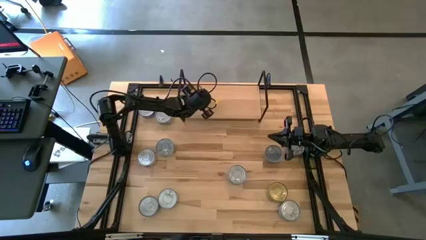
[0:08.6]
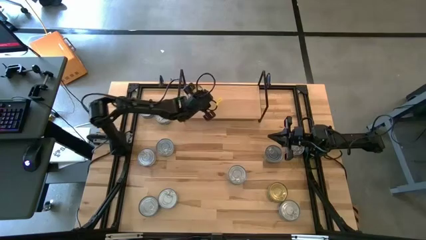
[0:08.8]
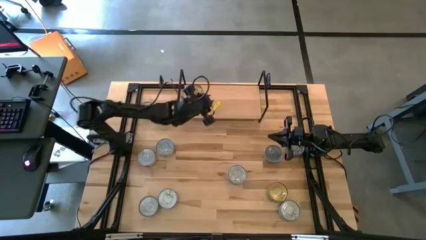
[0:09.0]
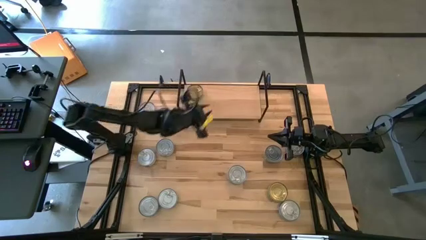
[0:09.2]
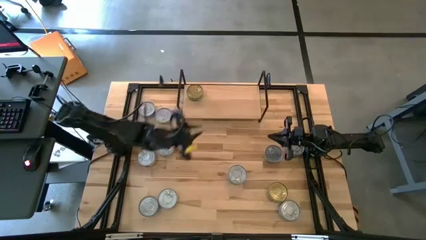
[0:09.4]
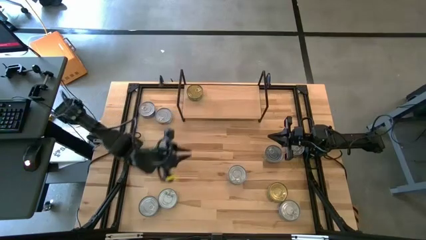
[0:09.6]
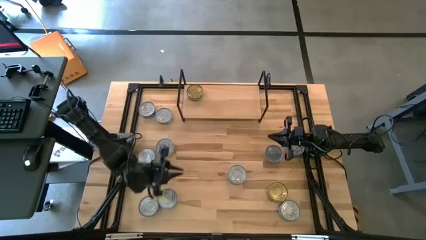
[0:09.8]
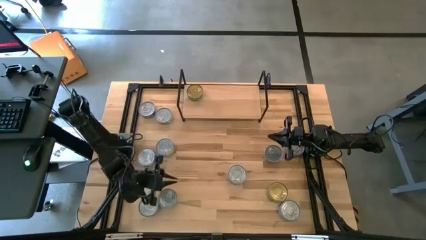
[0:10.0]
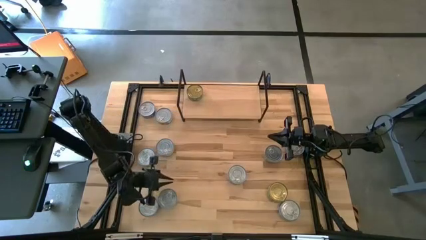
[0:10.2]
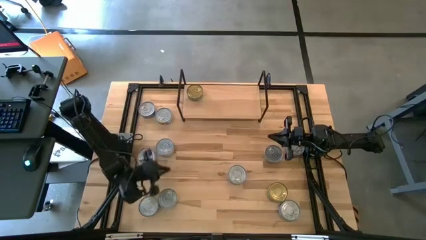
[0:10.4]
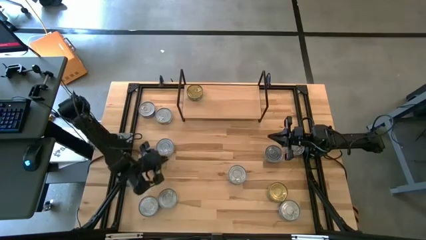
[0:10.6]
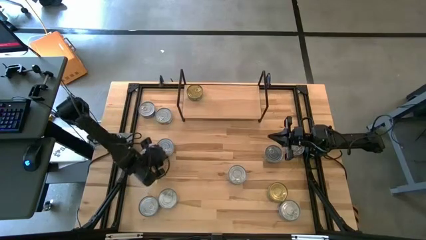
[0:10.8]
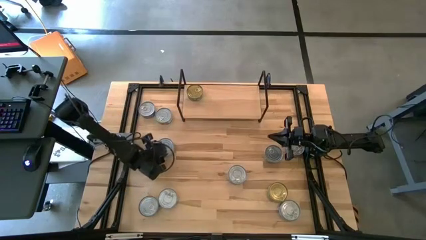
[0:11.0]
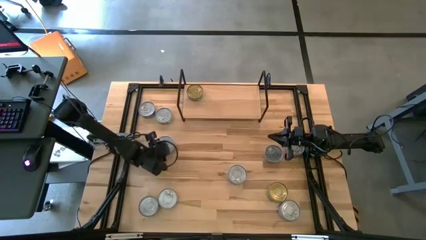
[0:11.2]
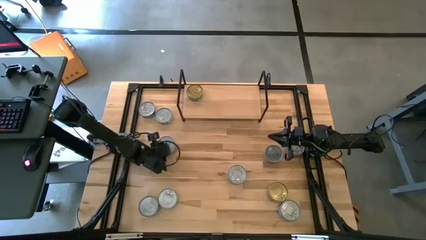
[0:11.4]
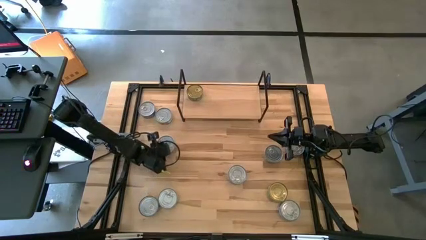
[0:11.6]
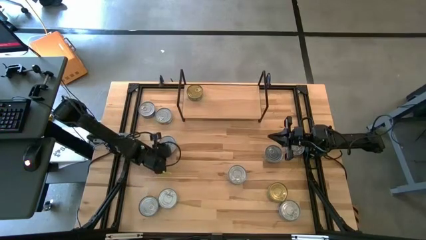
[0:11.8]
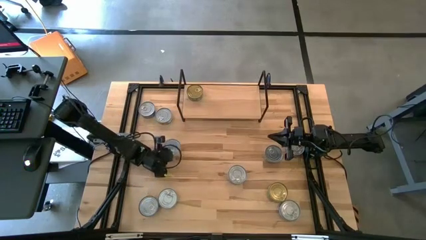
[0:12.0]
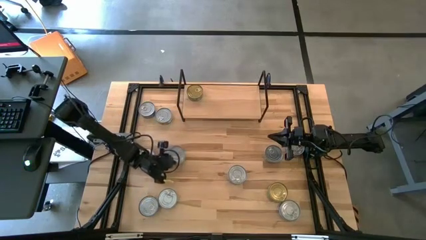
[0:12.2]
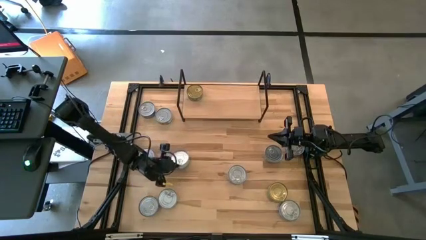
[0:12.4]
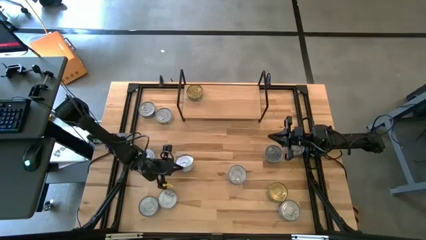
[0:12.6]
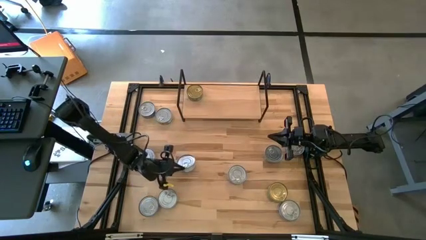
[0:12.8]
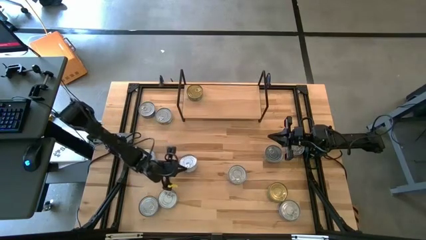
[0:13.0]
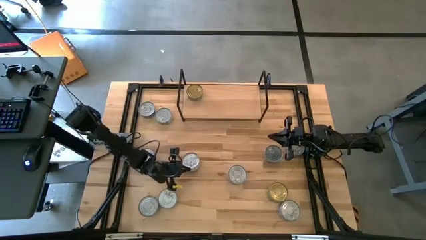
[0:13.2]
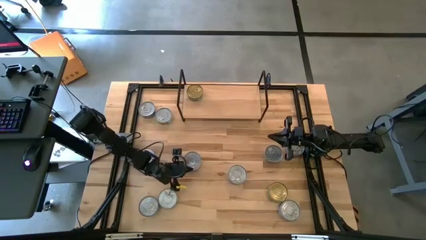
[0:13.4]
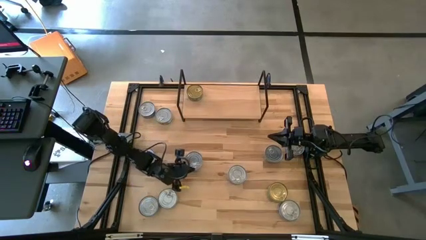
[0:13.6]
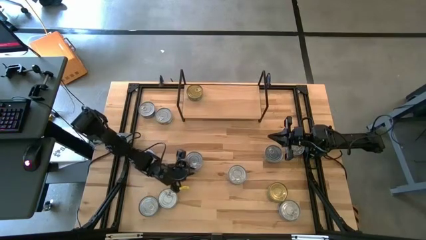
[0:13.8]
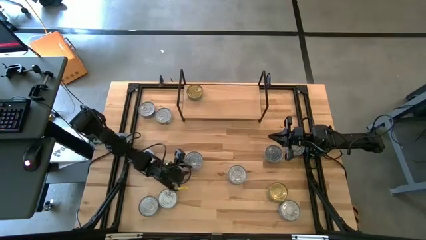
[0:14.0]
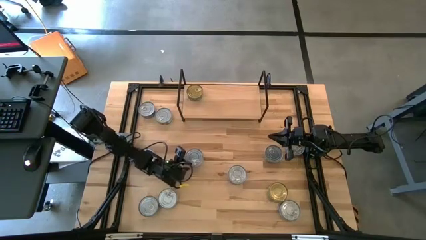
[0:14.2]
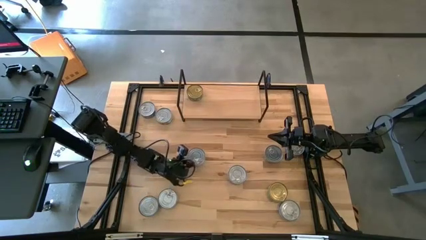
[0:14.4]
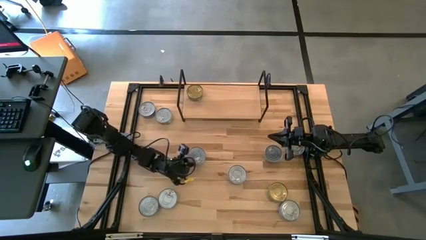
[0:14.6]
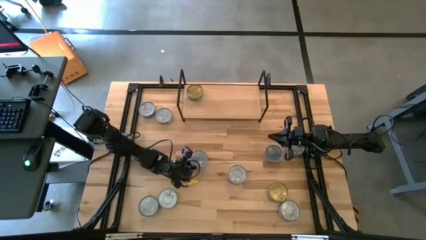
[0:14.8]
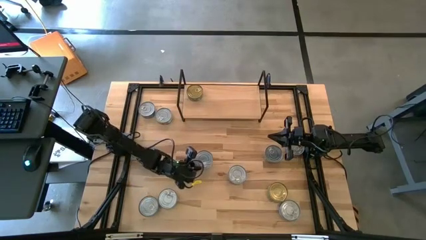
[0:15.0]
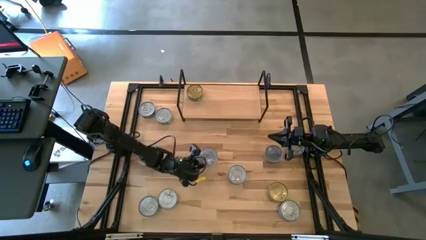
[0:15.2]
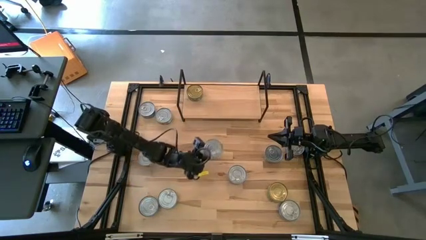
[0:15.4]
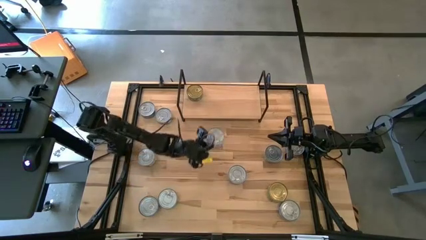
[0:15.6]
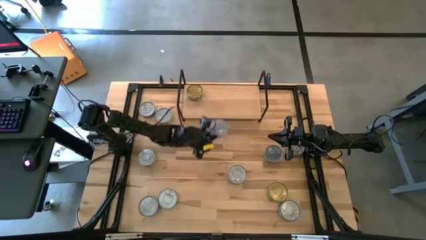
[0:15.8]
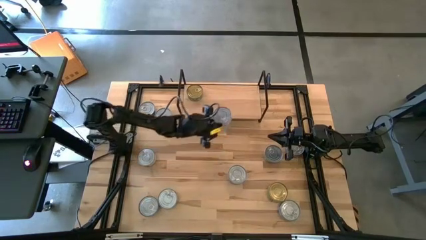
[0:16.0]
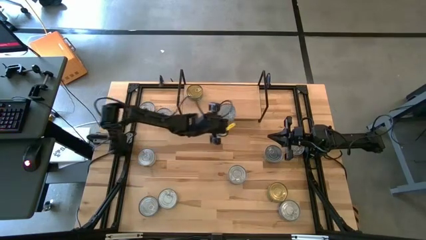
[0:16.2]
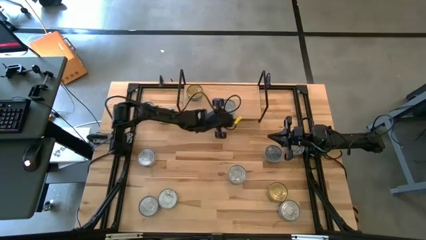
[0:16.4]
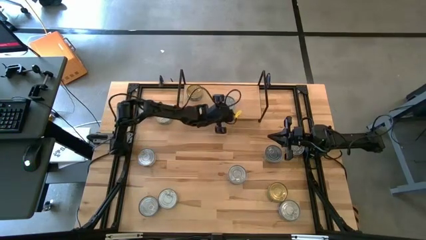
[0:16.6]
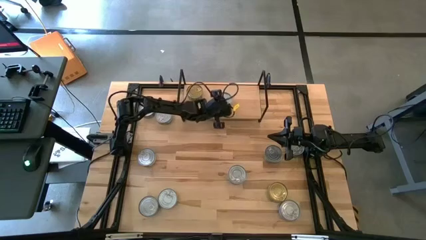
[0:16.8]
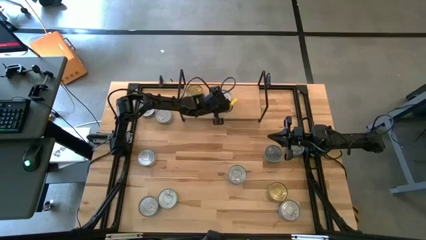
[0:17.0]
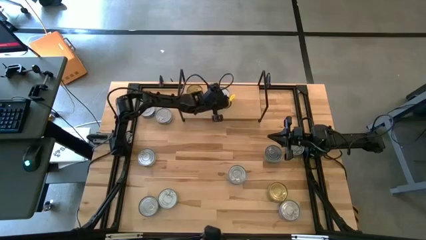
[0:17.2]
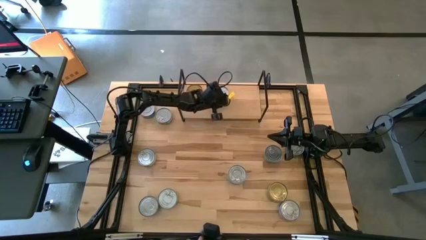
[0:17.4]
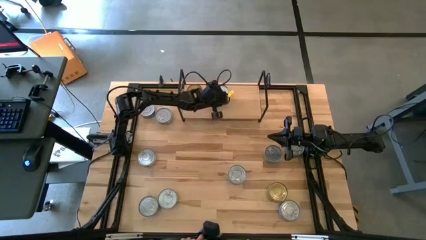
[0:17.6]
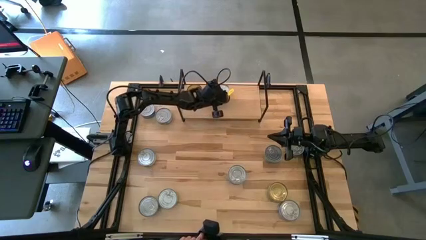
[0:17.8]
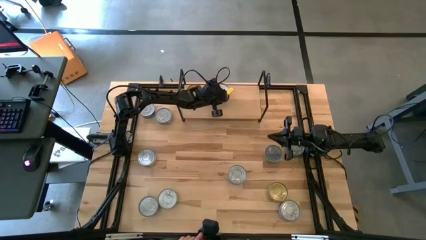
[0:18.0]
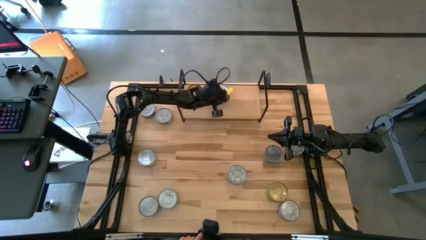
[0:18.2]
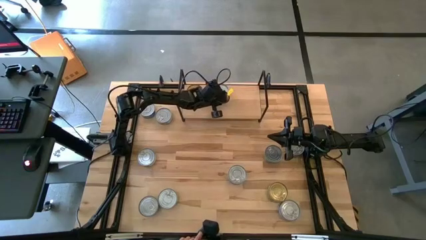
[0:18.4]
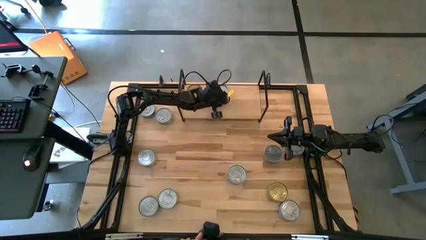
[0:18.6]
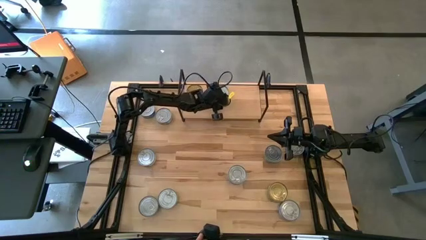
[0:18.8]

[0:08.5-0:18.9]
Task: Stack canned seafood by type on shelf
Put the yellow and blue tuna can on the shelf
